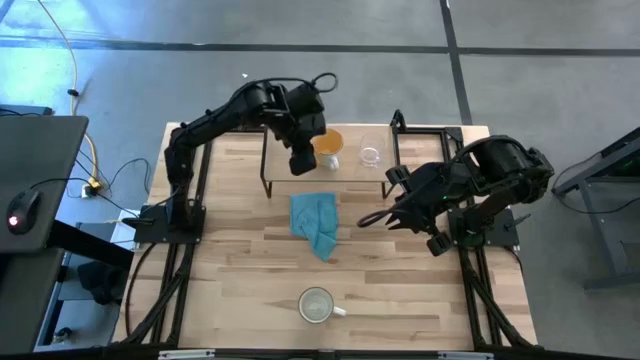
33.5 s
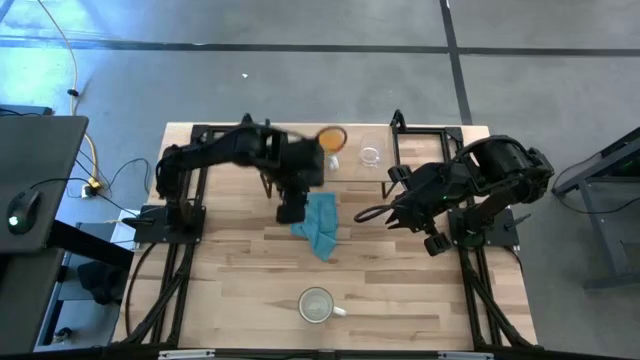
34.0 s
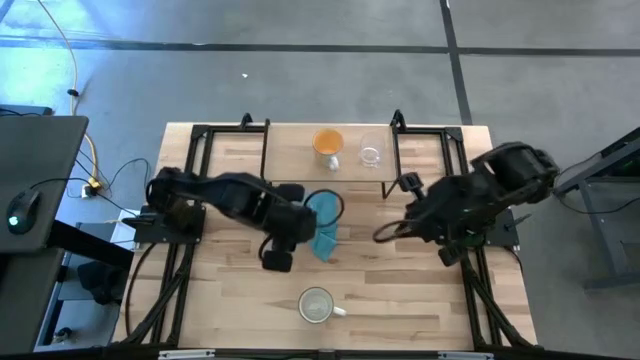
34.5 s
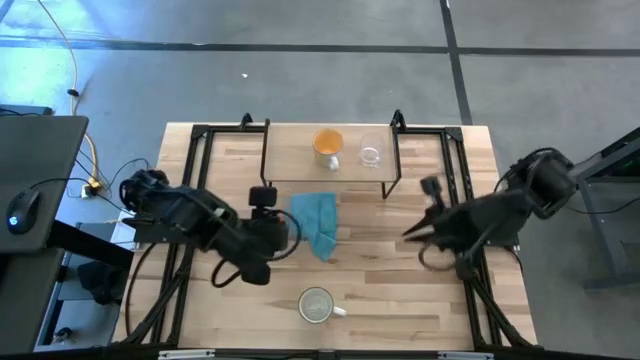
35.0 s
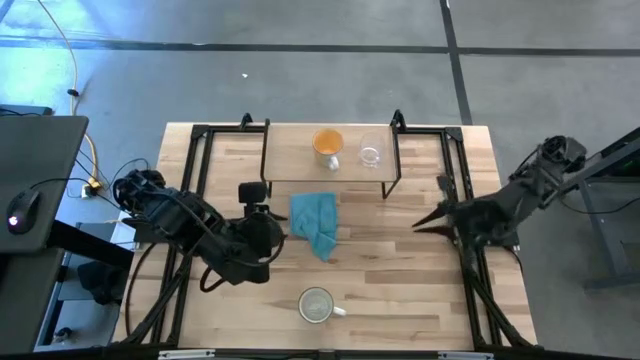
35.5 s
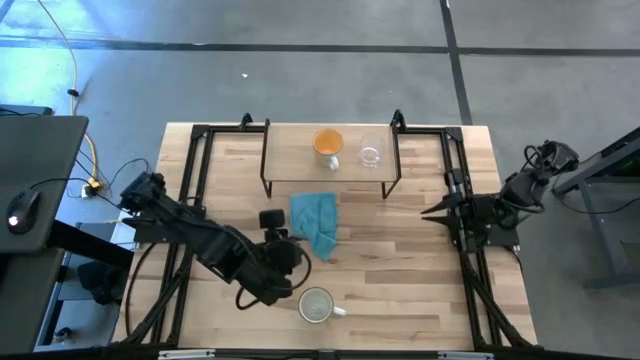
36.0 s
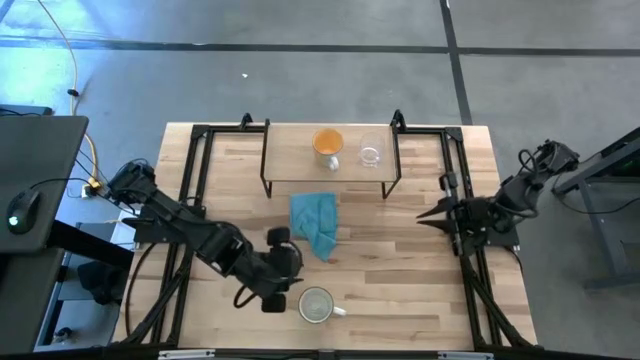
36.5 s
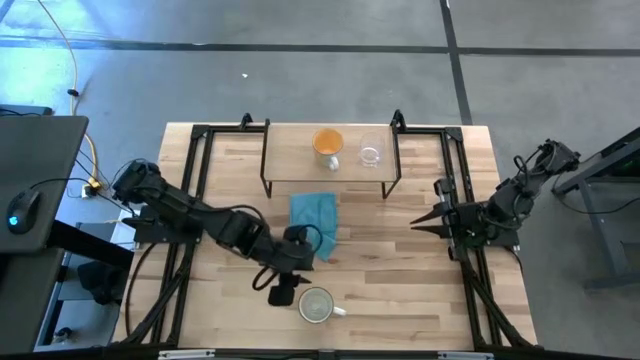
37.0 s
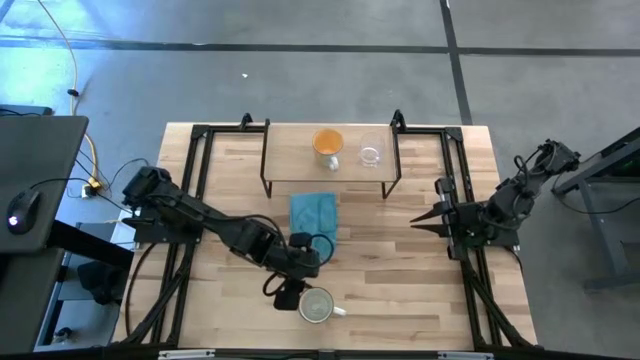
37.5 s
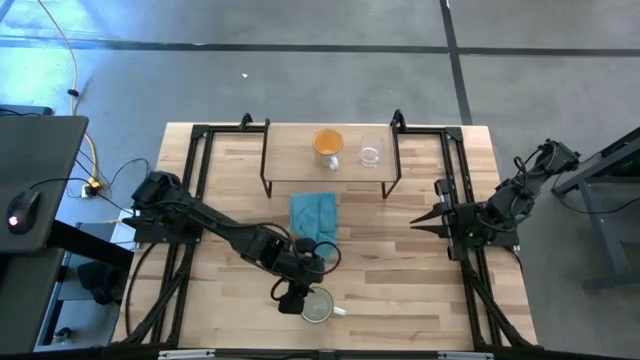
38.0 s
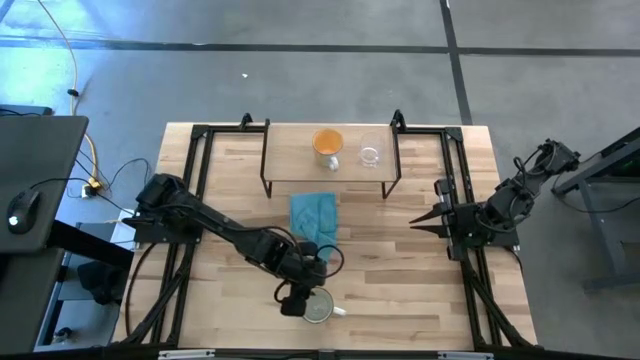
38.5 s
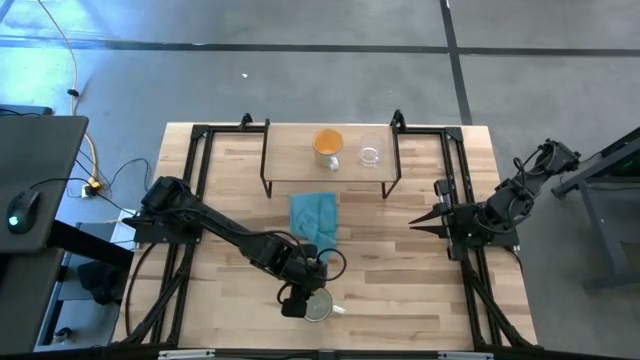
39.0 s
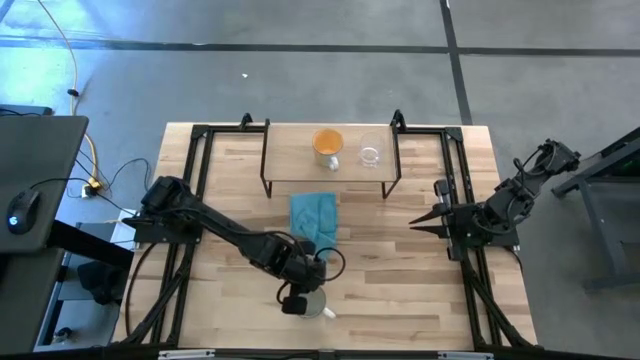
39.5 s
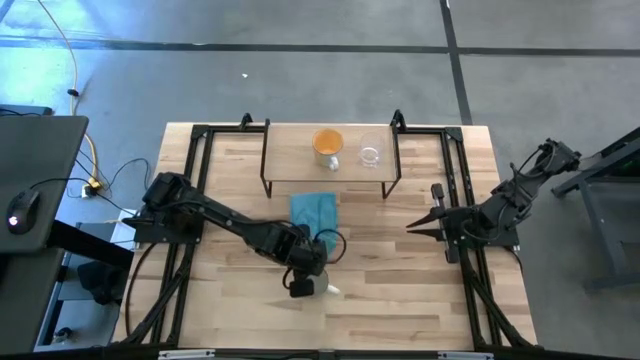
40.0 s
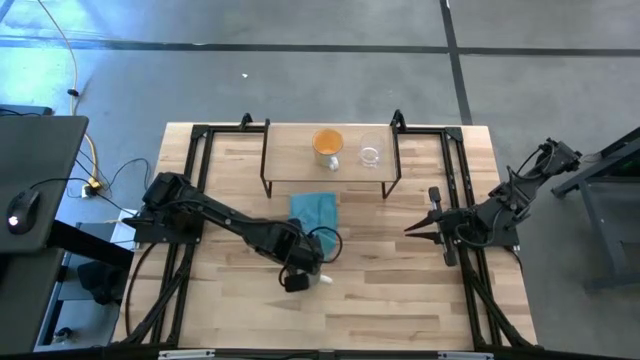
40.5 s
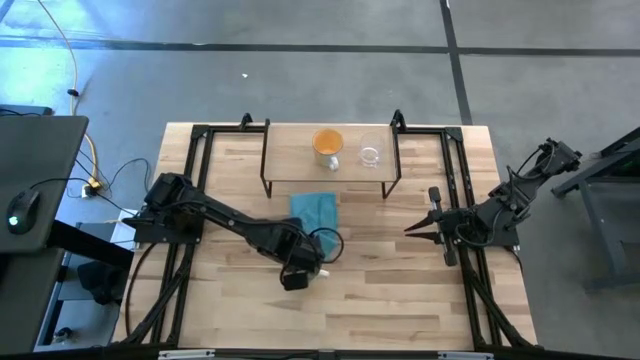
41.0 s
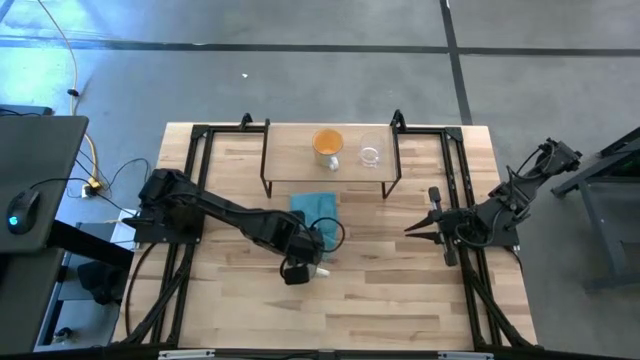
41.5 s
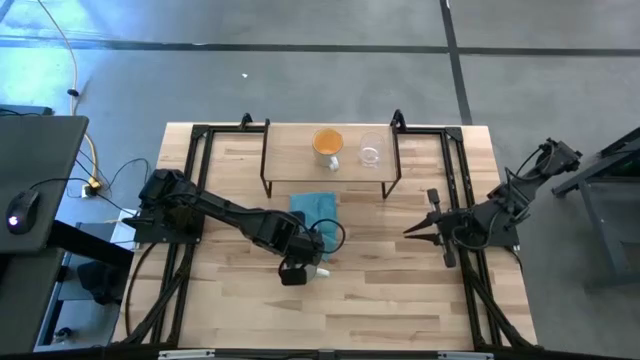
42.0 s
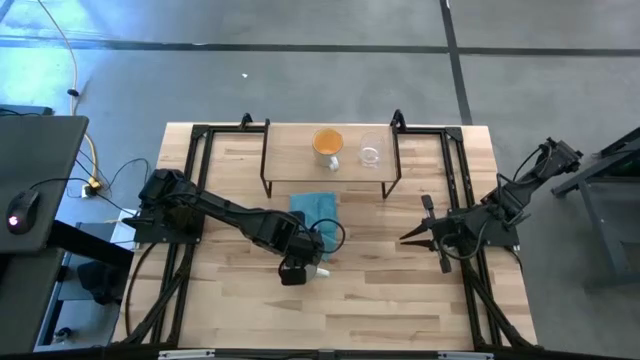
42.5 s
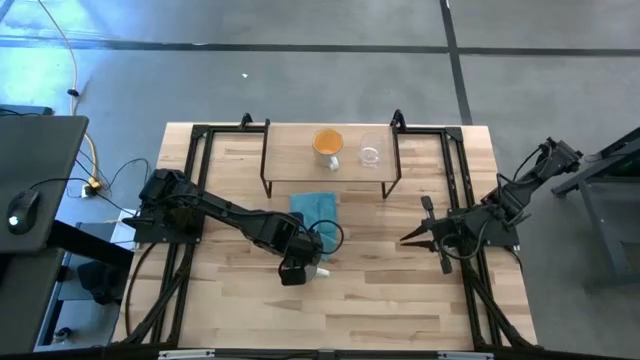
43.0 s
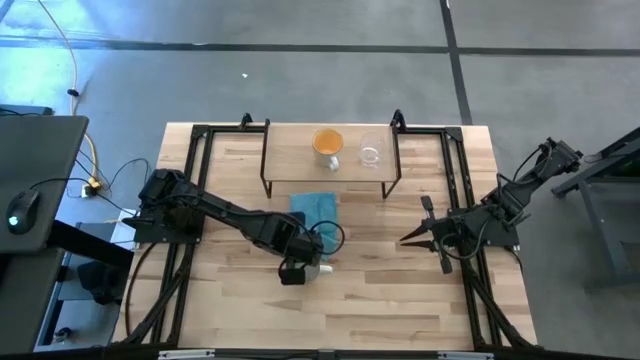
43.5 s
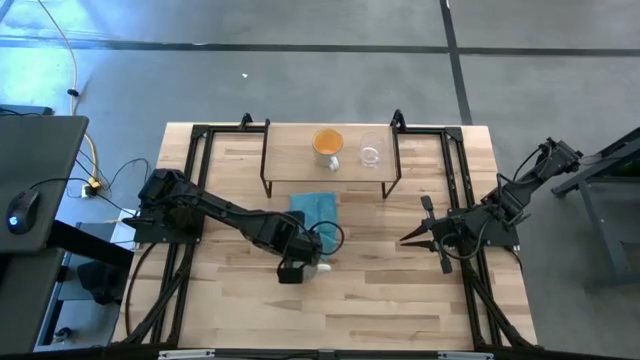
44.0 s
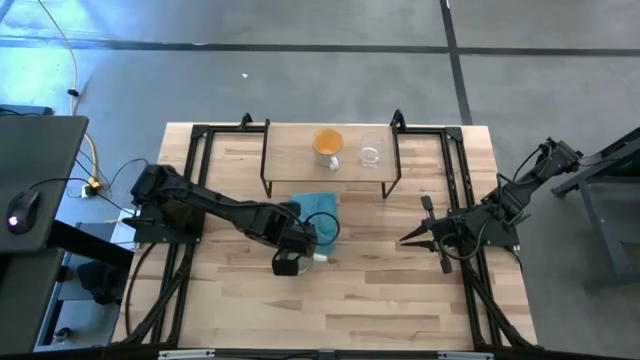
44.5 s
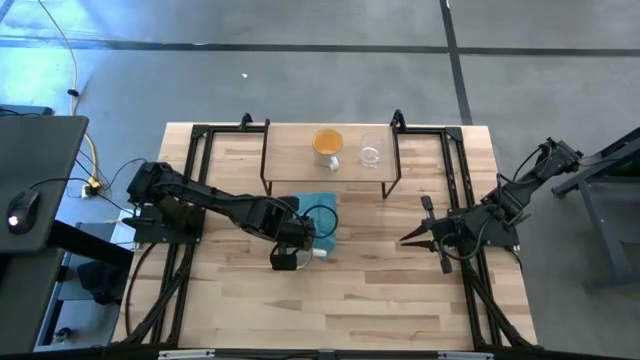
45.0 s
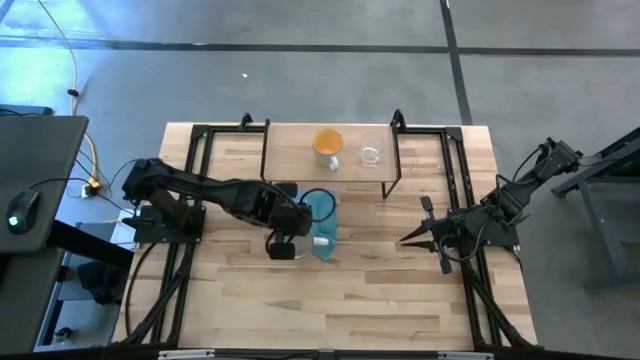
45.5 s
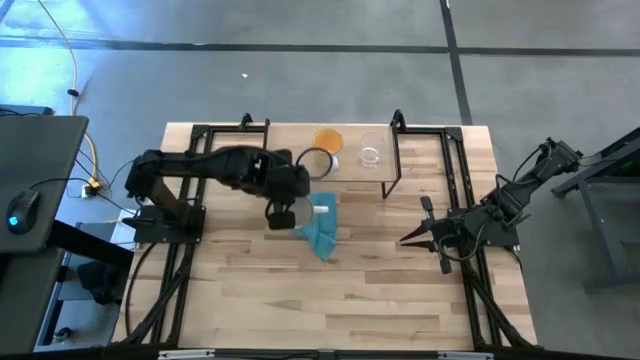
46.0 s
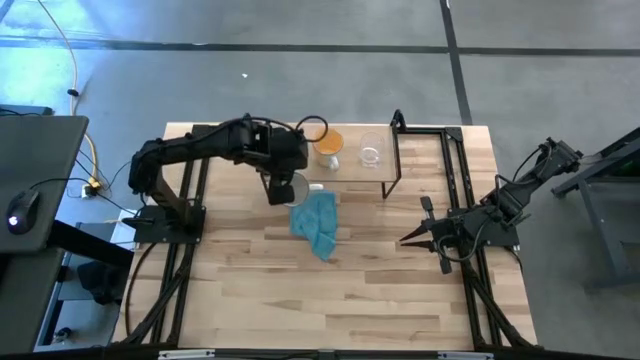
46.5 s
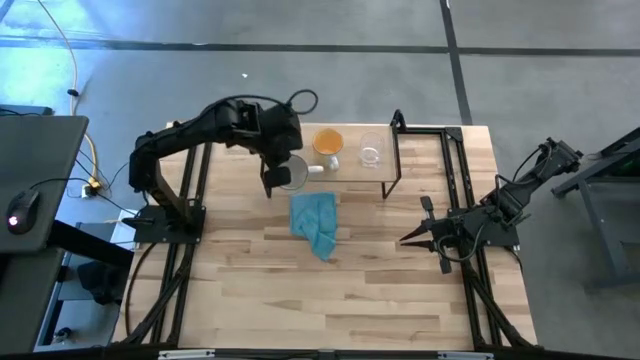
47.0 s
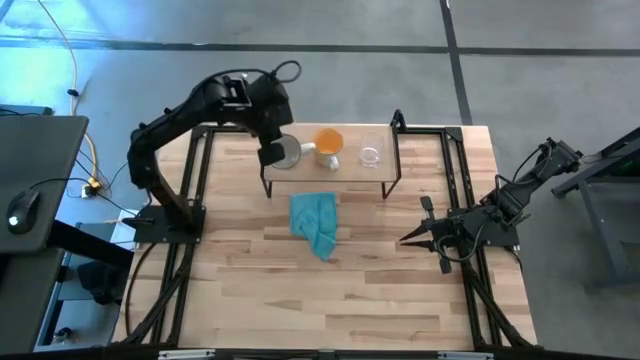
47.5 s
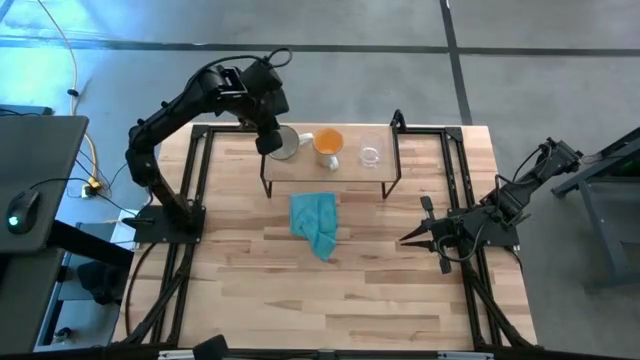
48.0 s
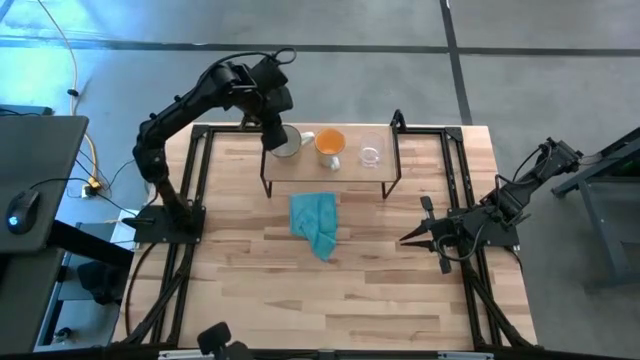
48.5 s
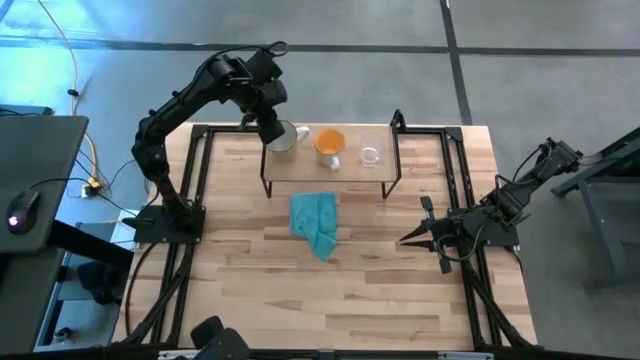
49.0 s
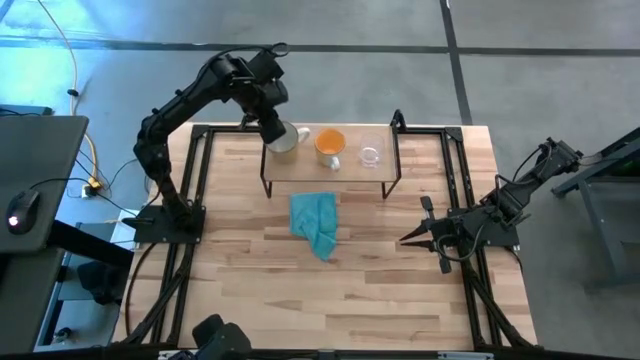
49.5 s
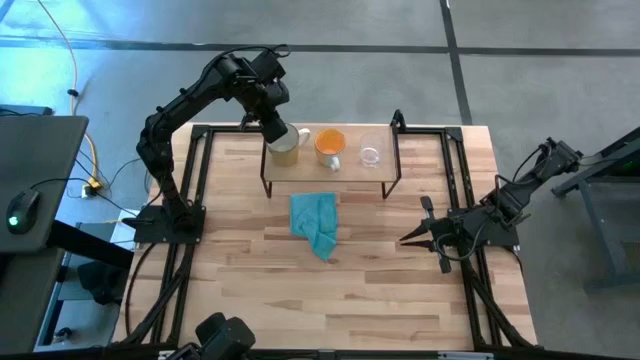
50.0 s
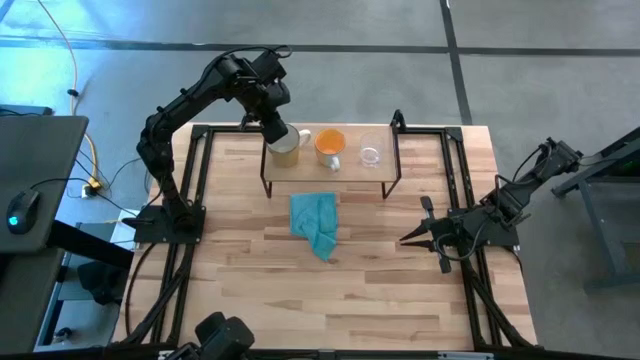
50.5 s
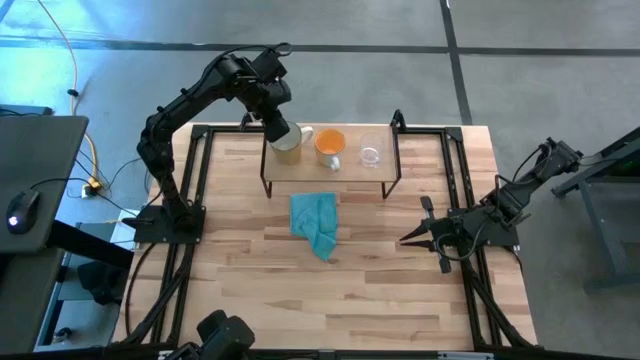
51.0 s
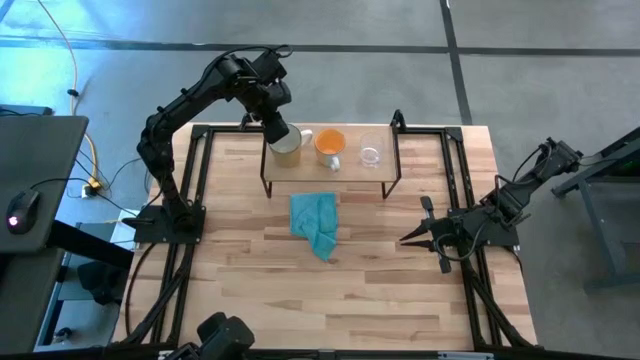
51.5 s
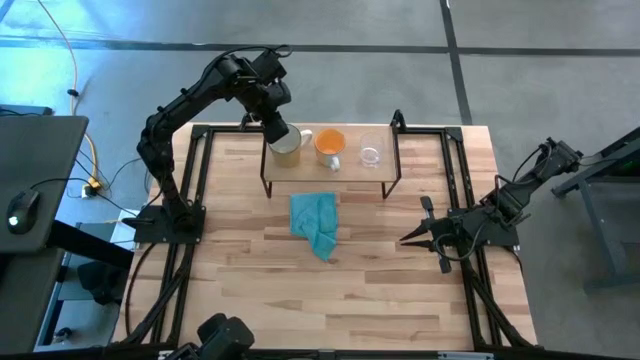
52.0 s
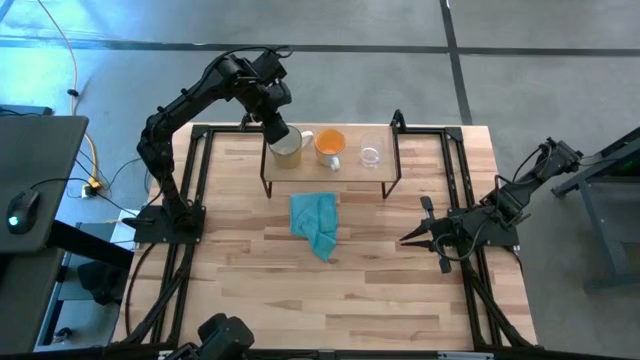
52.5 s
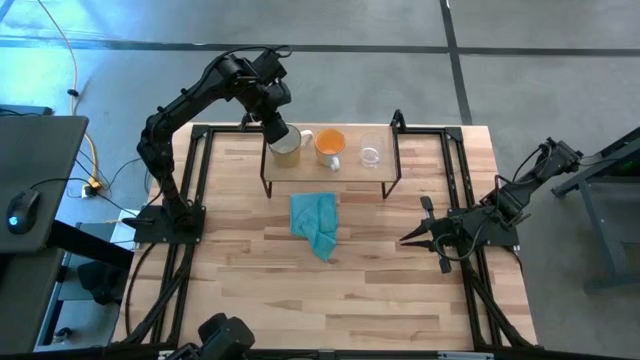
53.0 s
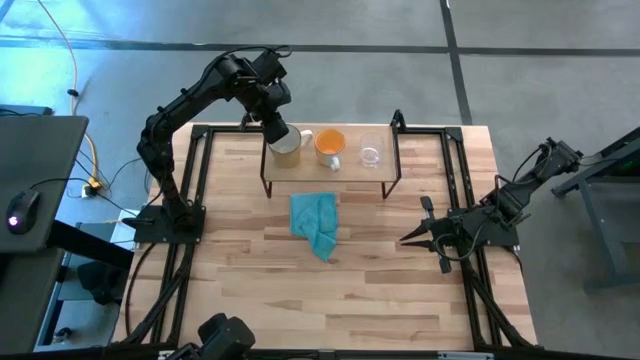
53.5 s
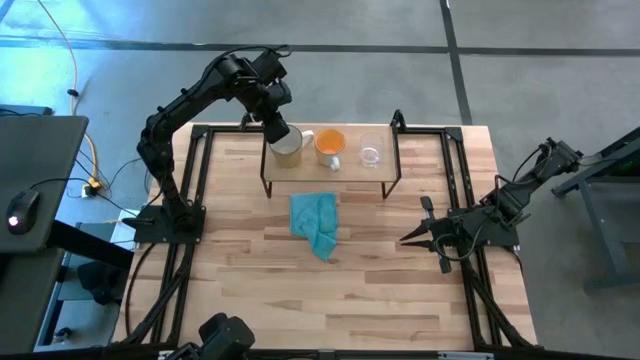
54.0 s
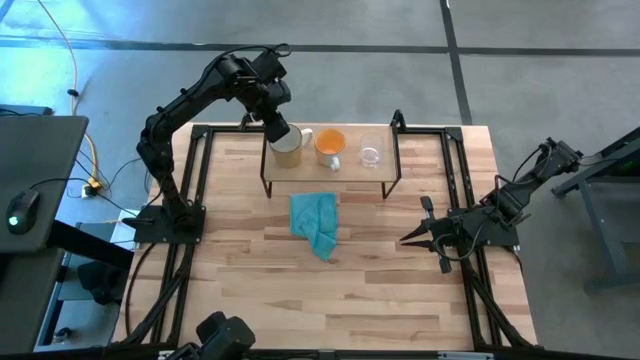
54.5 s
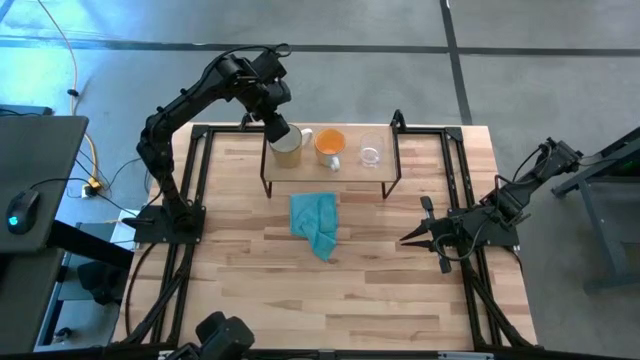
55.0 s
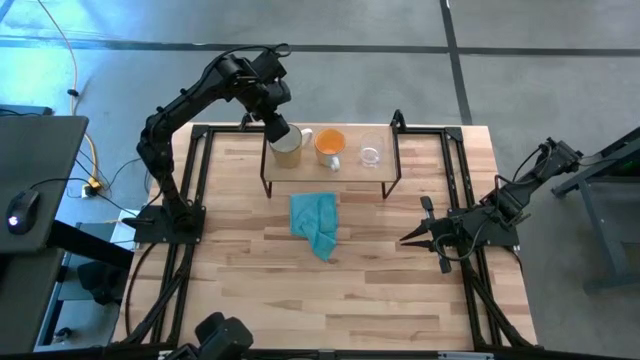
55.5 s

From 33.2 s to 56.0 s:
Task: Stack small to large cups/mugs on shelf
Put the yellow mug on the shelf
